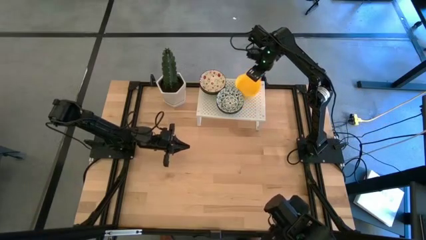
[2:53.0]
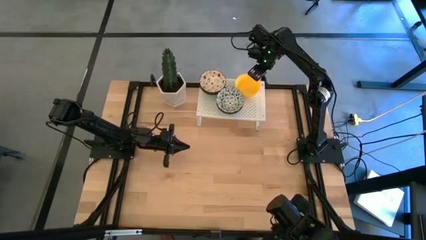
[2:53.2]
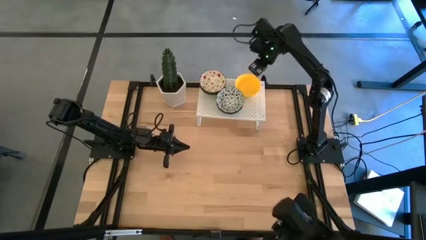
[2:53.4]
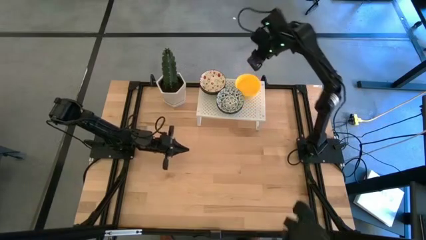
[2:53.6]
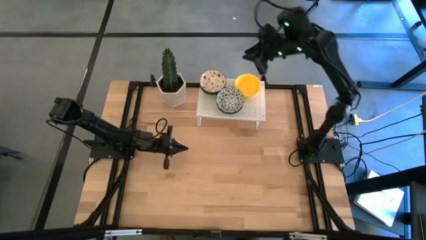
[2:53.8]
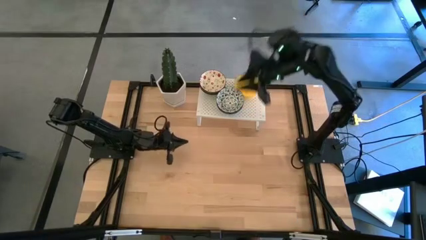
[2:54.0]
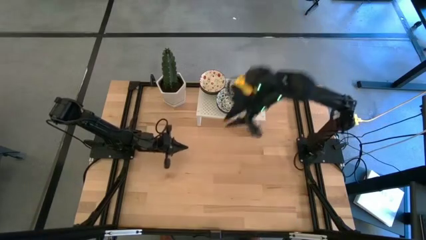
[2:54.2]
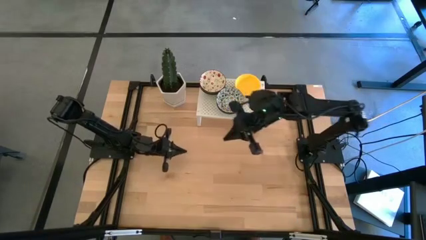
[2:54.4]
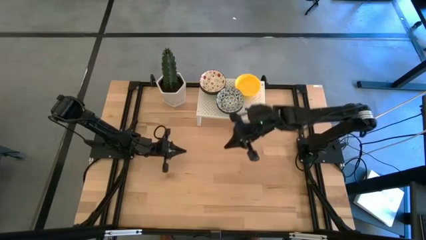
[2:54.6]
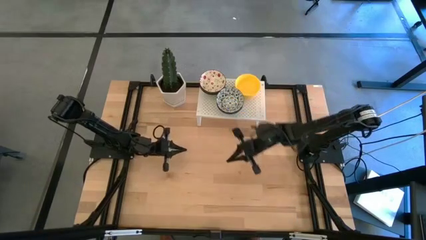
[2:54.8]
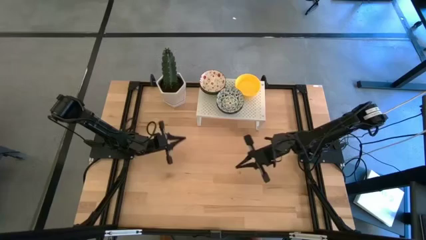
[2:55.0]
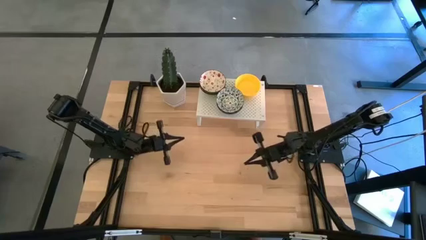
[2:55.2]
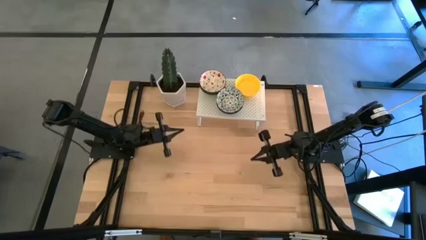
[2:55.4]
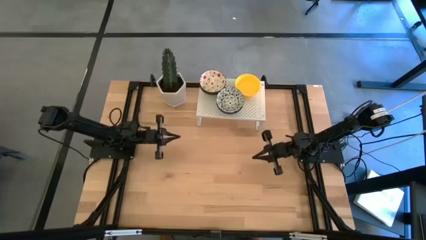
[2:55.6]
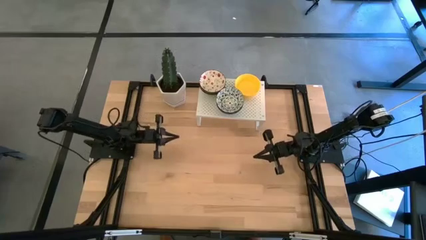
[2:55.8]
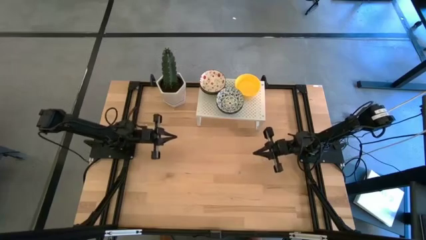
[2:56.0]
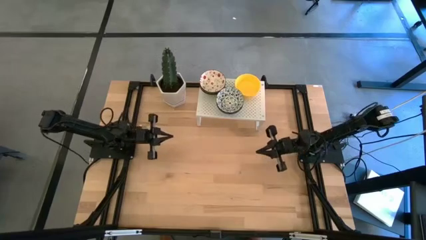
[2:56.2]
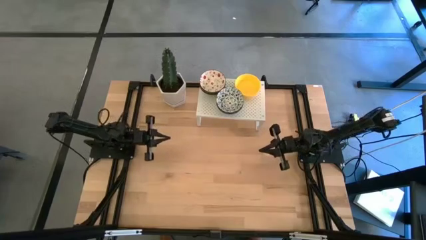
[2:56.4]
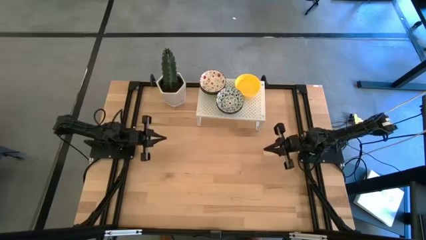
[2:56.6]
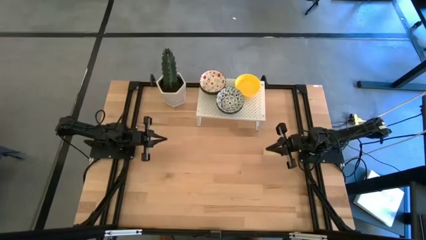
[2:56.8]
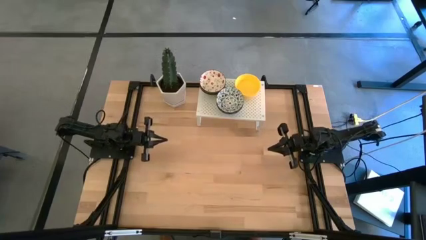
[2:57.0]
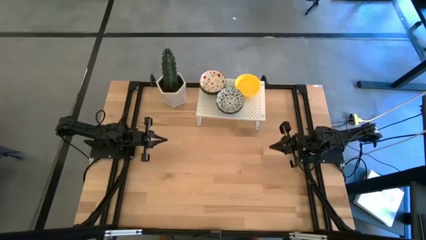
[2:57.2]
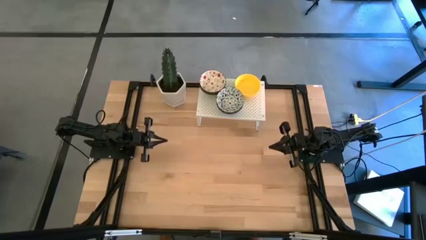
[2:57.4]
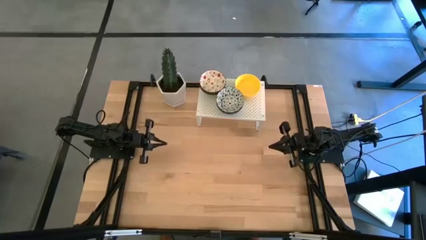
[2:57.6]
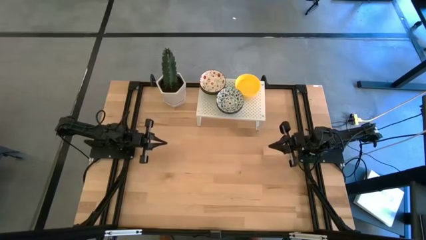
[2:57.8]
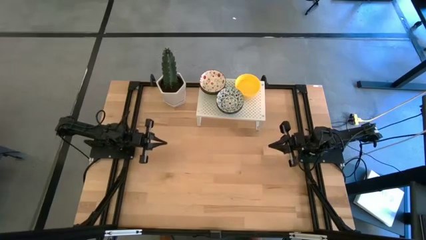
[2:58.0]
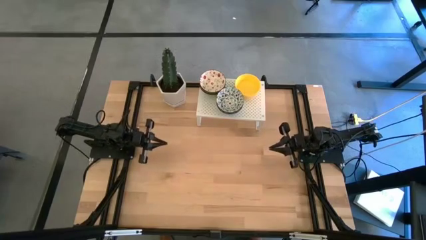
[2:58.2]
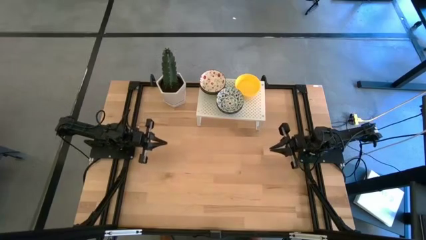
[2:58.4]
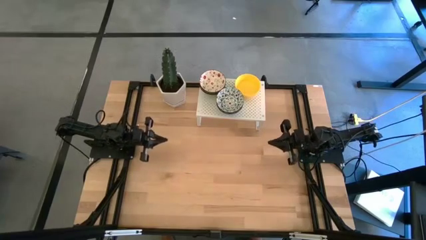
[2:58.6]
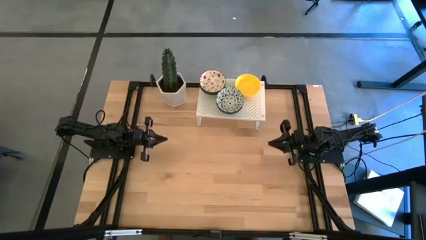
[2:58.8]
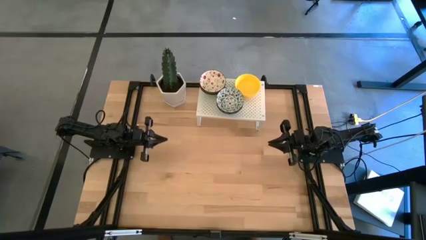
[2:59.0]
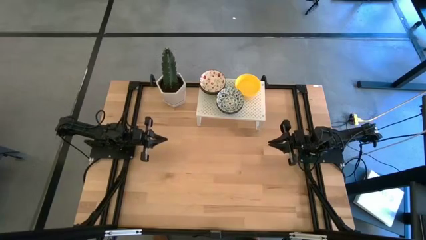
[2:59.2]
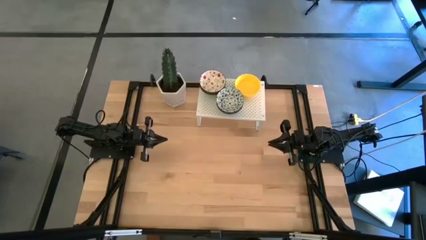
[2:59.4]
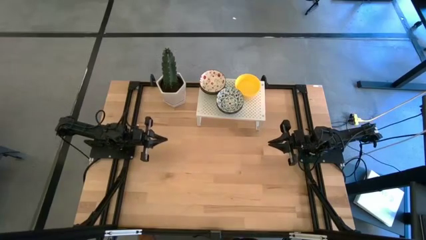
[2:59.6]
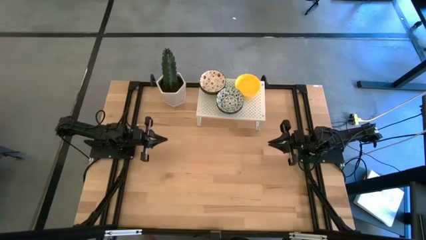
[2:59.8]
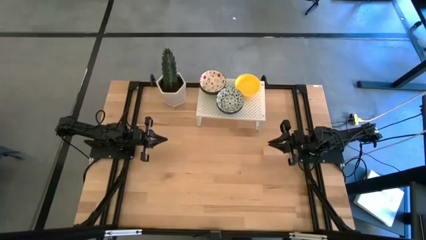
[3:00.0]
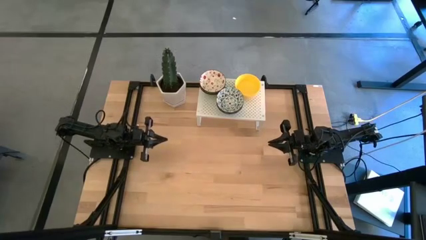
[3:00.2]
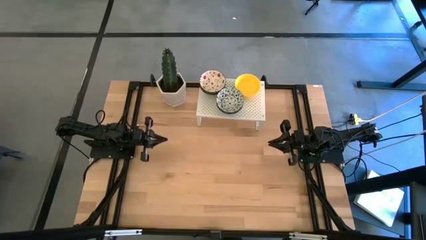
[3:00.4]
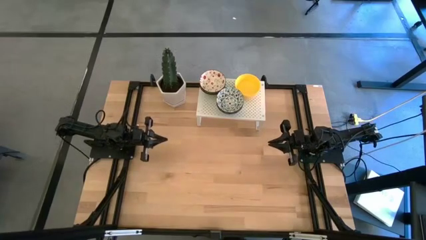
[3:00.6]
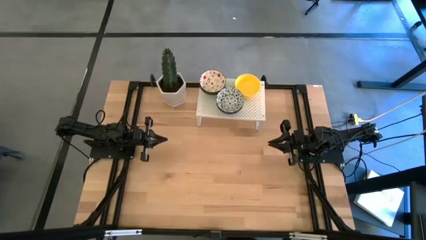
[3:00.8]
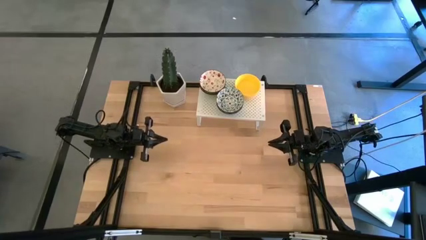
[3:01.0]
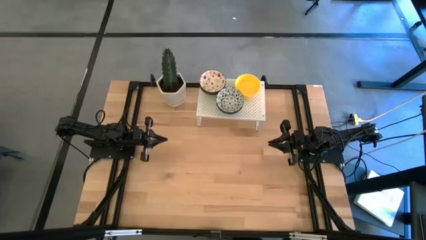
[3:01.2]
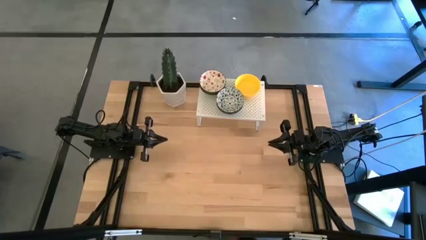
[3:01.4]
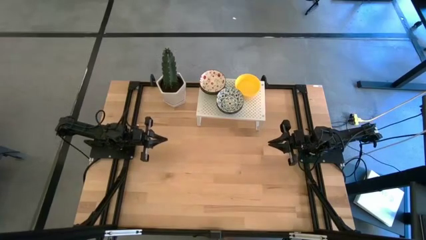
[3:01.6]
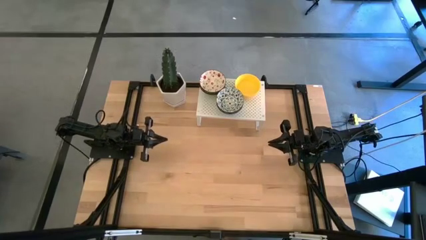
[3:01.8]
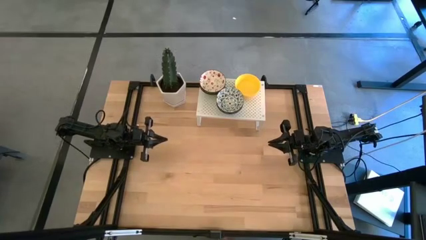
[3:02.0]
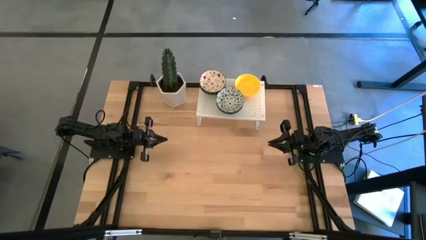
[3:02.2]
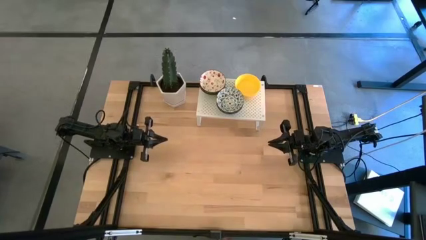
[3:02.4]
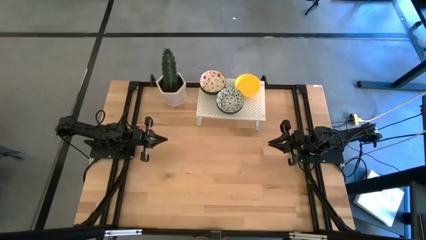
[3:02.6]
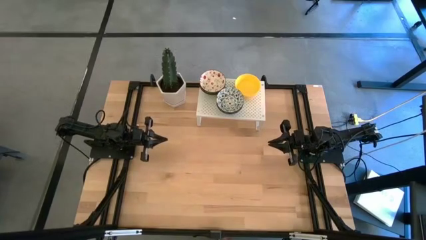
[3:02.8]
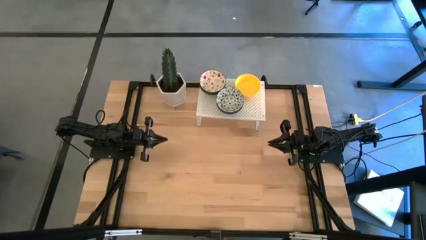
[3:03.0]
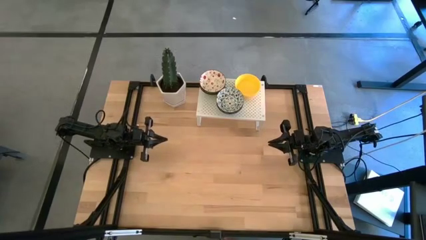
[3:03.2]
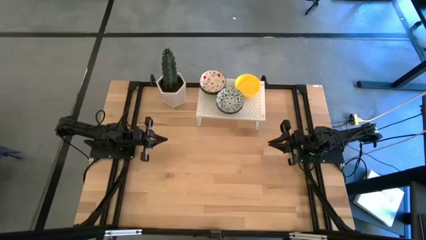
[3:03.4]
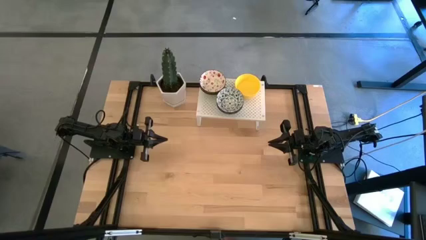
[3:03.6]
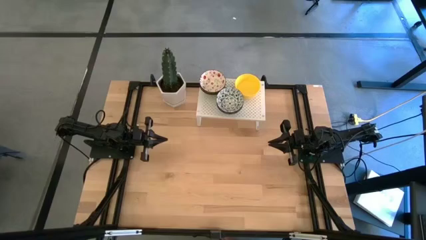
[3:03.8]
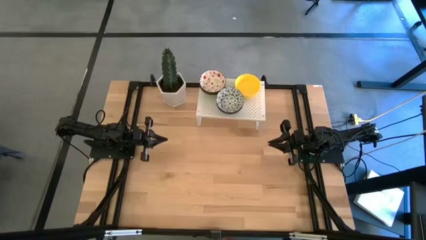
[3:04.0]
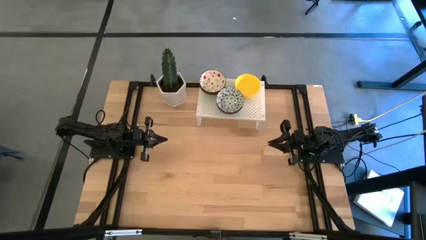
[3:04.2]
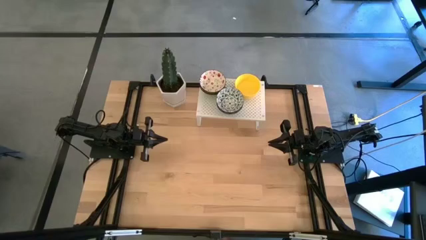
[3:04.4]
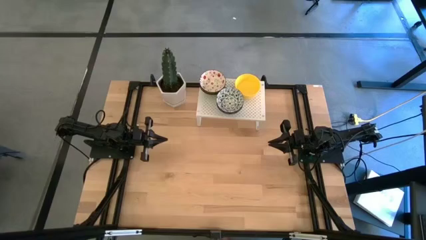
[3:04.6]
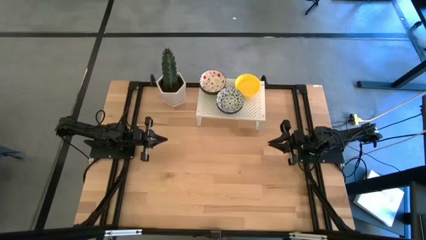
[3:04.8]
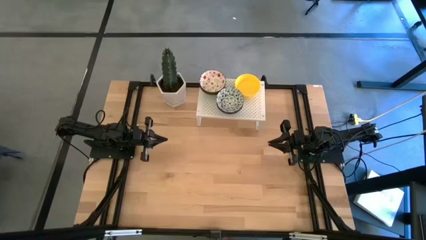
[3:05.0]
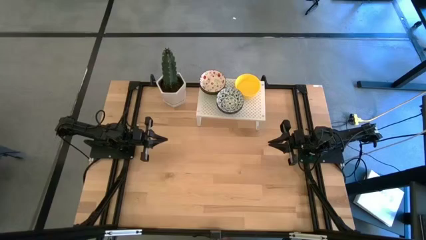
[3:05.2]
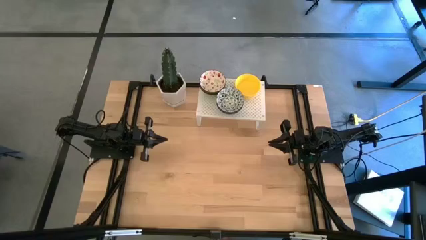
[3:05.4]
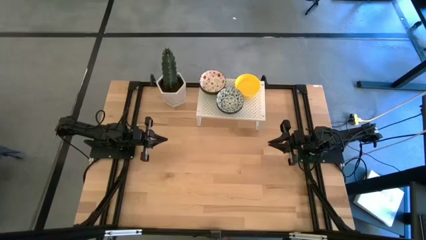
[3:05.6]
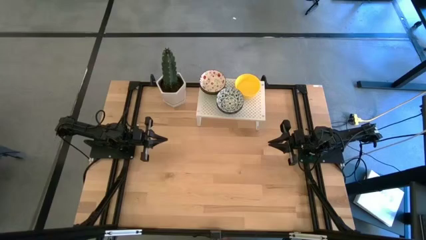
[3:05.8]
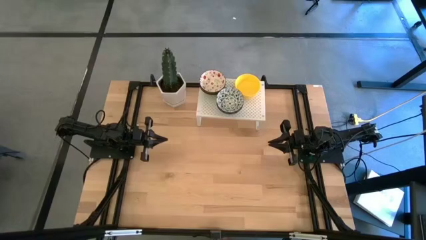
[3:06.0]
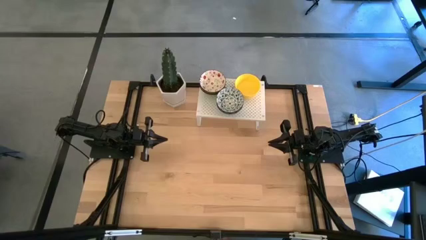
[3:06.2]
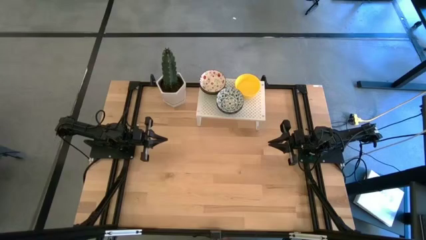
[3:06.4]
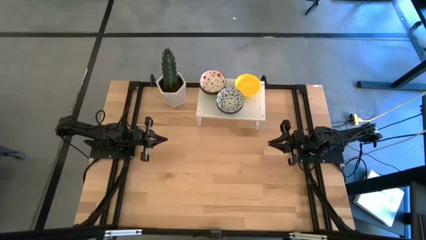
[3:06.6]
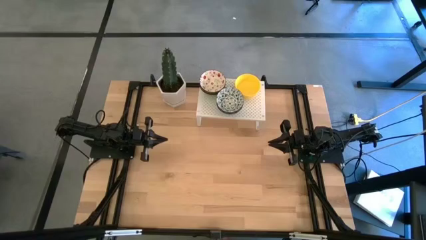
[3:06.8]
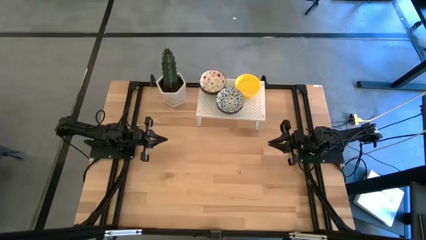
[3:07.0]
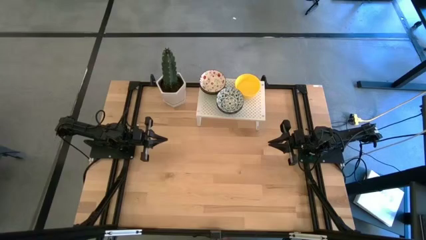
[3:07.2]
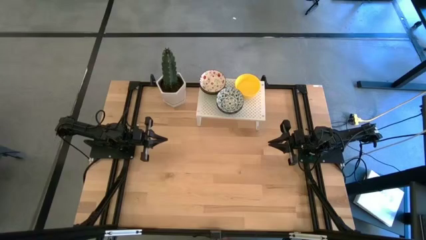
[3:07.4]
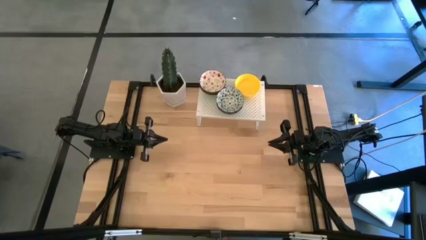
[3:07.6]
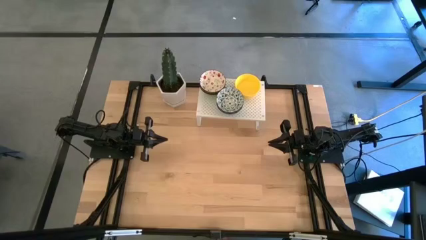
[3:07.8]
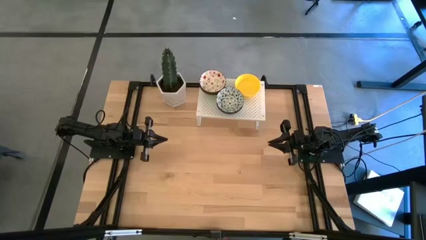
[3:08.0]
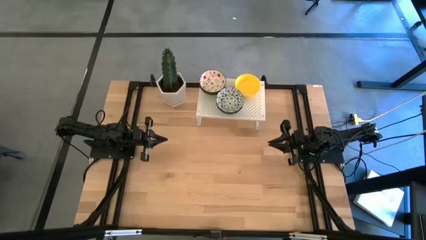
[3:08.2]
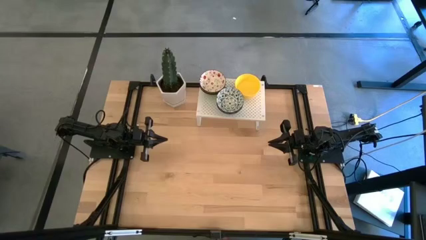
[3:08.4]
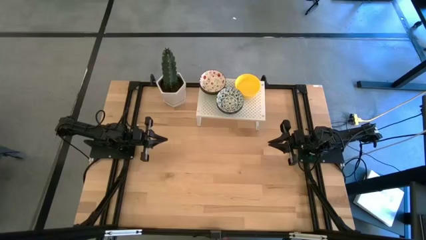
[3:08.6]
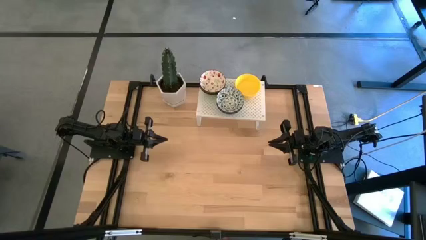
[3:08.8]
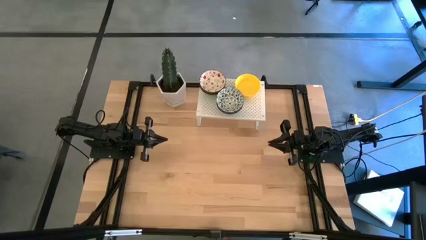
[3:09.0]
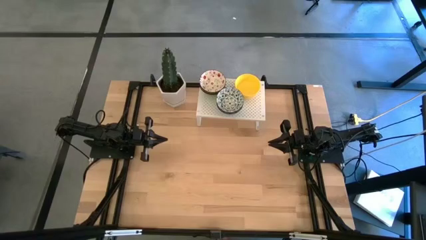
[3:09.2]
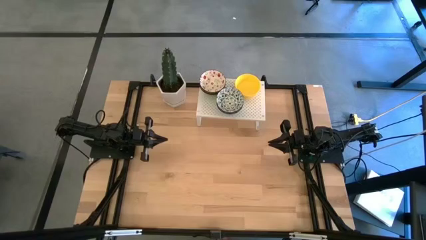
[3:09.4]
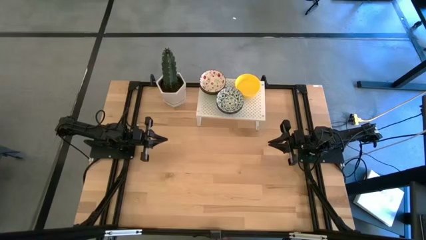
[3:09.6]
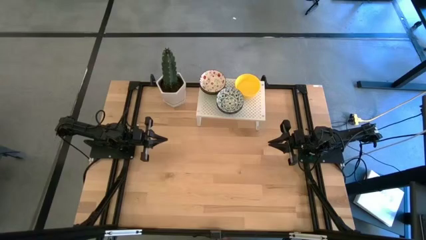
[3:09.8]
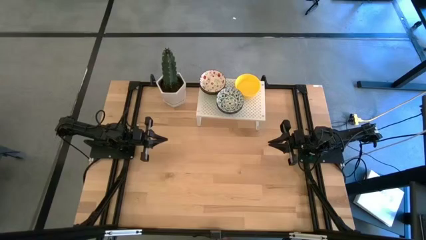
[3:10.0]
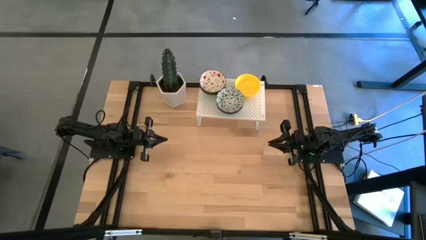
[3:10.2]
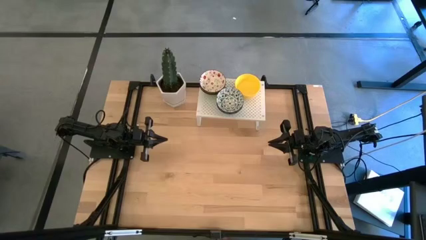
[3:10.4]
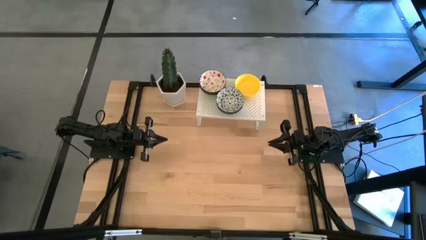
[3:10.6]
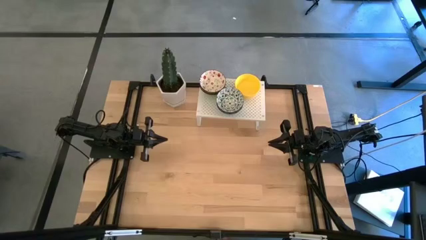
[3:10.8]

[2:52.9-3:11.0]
Task: Pick & Place Mini bowls
Return to Home Position
